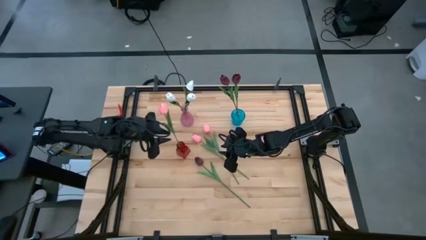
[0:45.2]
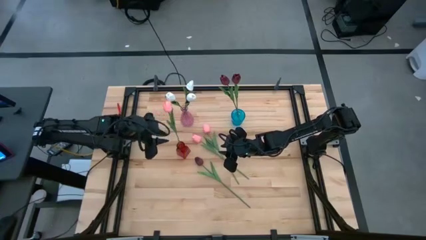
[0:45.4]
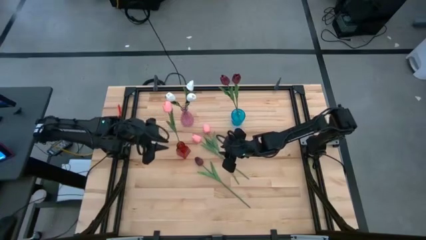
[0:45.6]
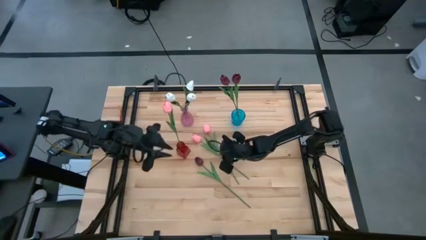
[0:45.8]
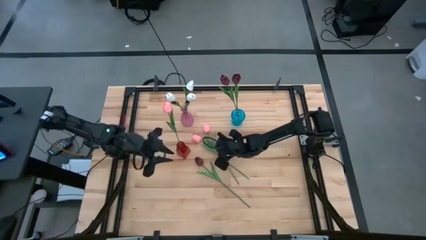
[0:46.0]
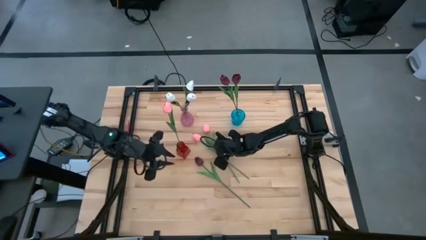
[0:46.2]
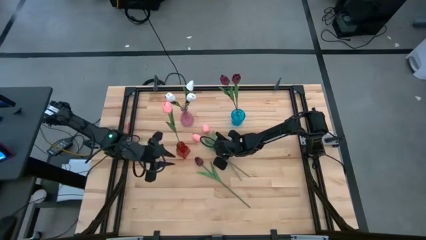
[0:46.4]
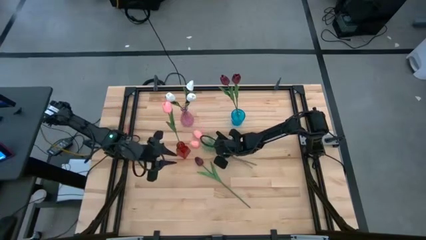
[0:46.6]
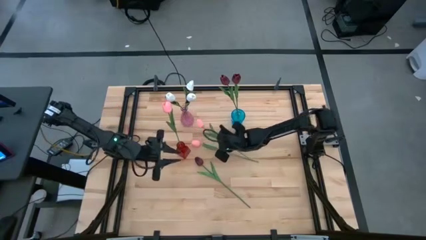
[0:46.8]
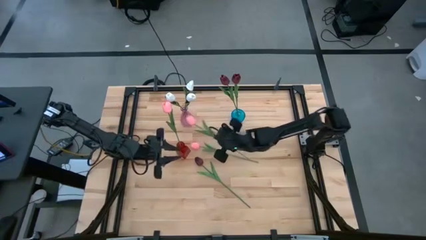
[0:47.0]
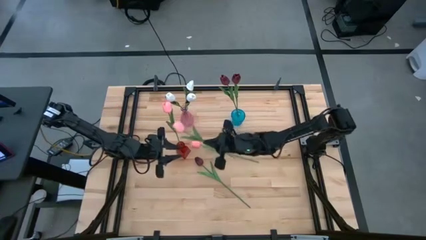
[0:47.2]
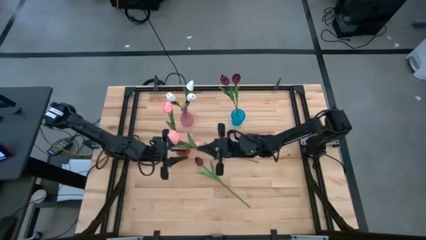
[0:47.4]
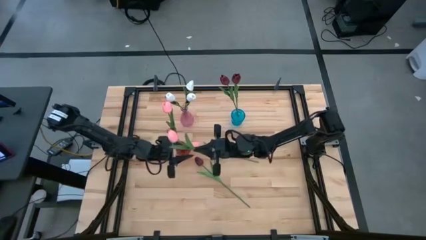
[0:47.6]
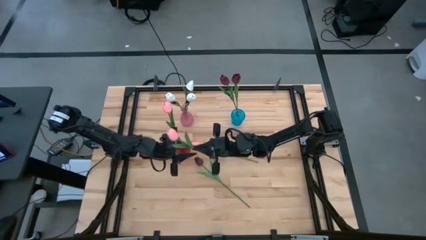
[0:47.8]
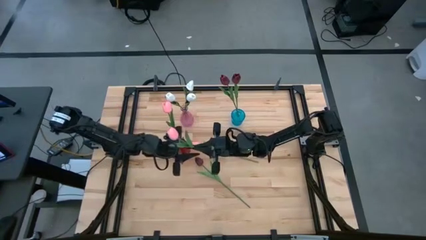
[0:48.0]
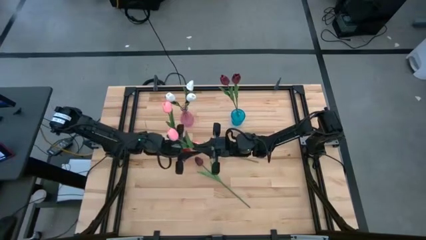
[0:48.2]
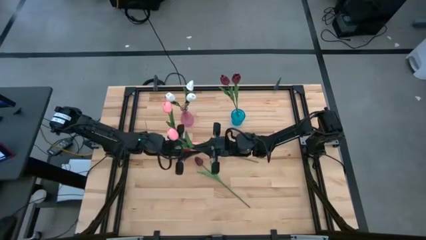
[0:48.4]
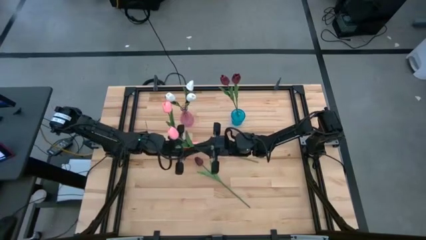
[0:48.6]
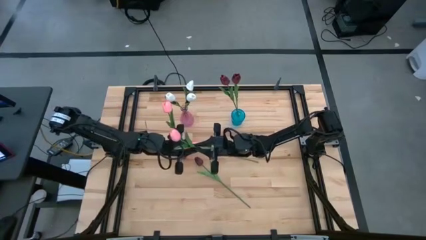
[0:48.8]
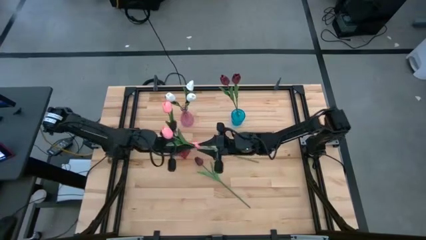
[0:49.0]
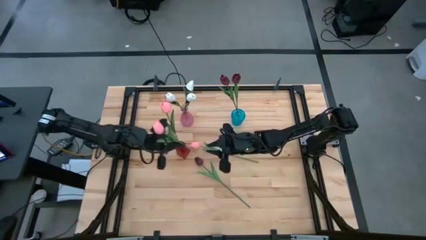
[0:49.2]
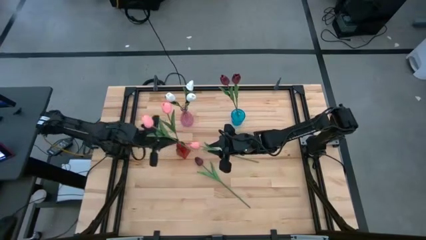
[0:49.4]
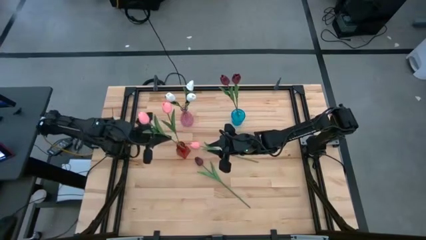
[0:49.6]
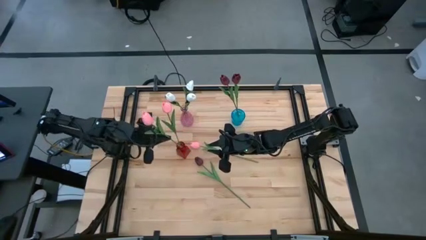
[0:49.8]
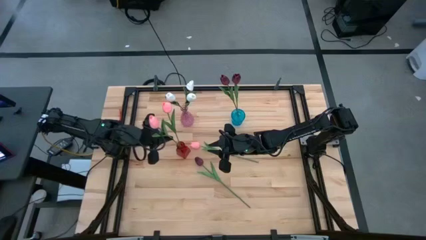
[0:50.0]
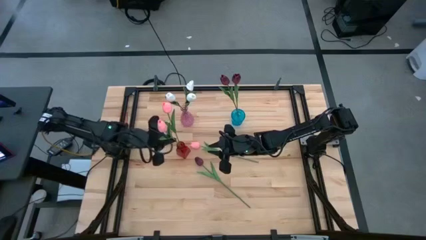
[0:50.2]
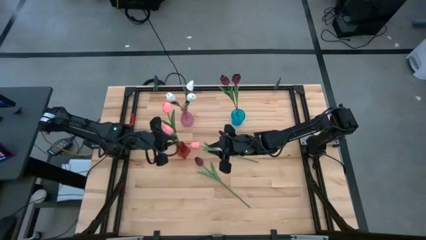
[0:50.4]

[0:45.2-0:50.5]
Task: Sort flowers into vase by color
Put the top pink flower into the red vase

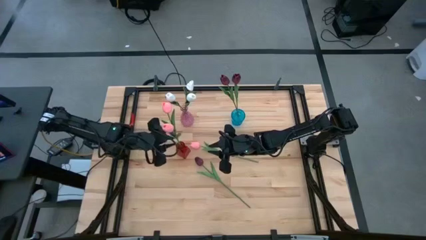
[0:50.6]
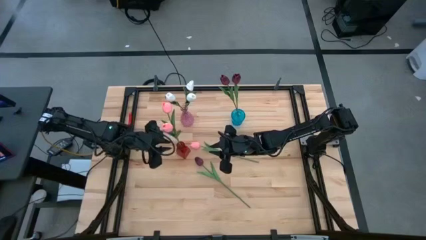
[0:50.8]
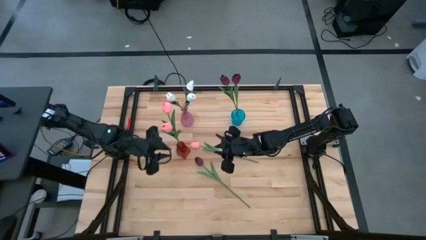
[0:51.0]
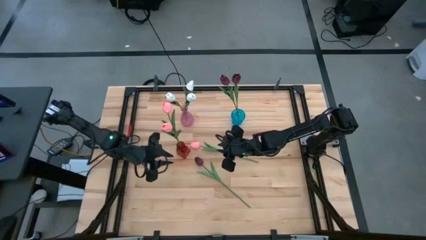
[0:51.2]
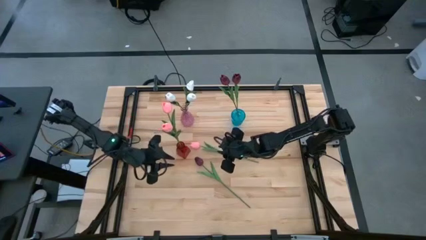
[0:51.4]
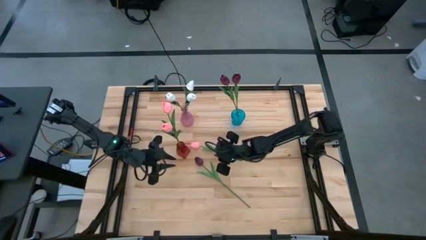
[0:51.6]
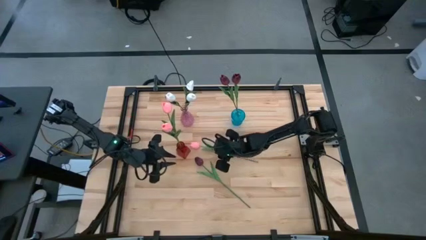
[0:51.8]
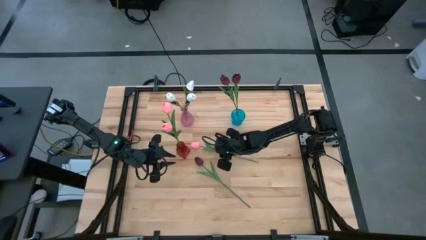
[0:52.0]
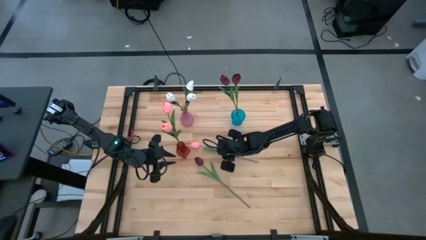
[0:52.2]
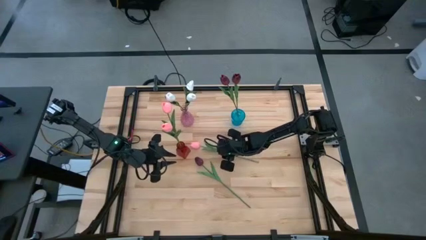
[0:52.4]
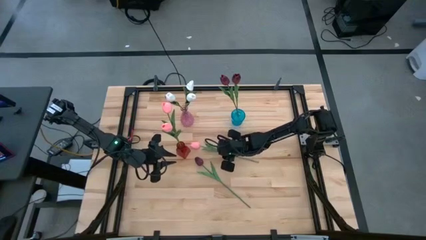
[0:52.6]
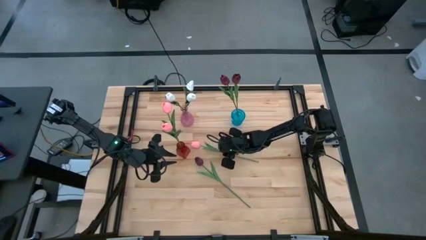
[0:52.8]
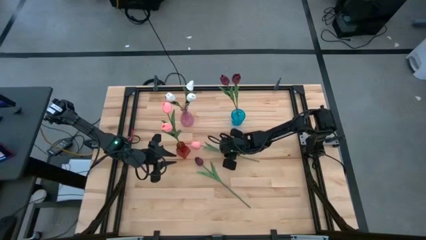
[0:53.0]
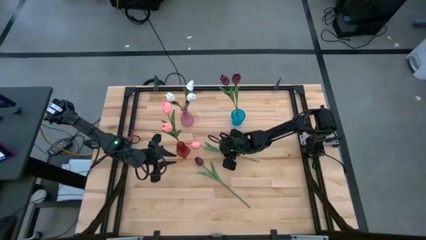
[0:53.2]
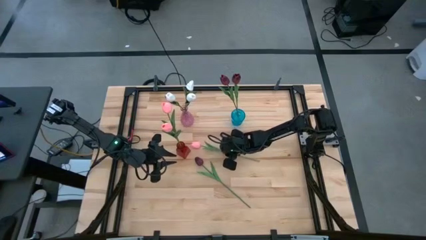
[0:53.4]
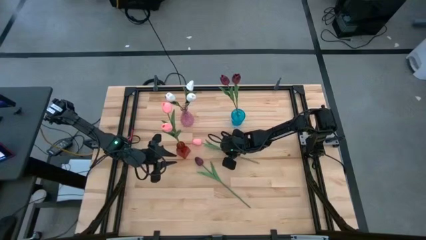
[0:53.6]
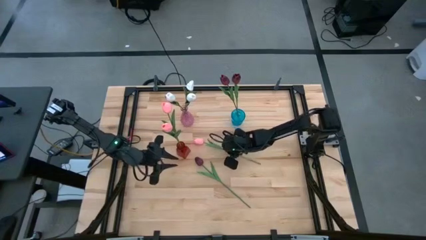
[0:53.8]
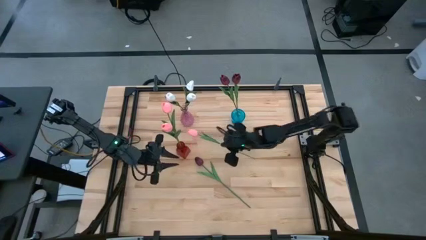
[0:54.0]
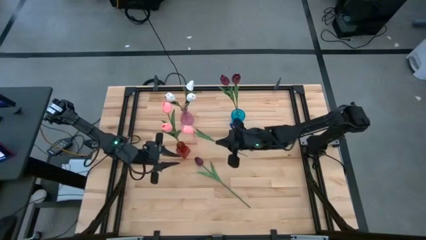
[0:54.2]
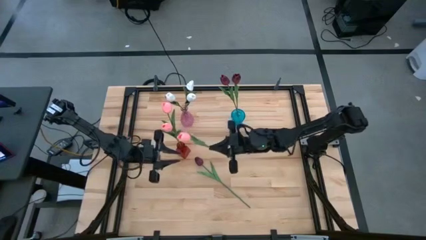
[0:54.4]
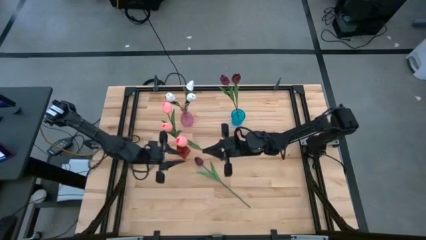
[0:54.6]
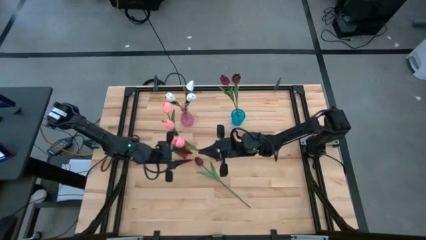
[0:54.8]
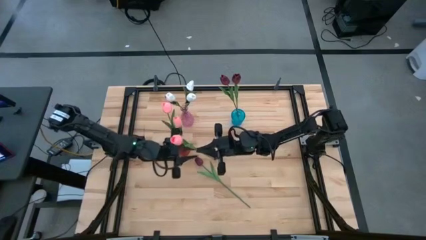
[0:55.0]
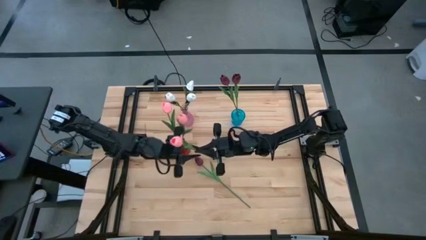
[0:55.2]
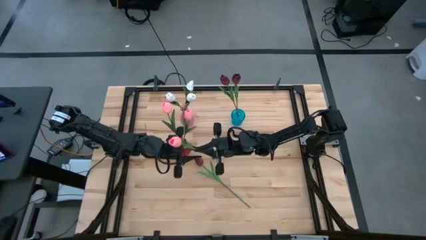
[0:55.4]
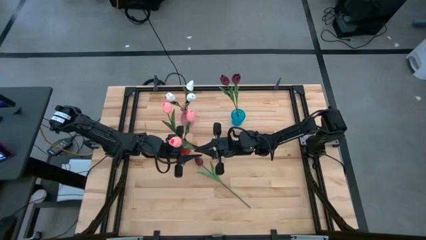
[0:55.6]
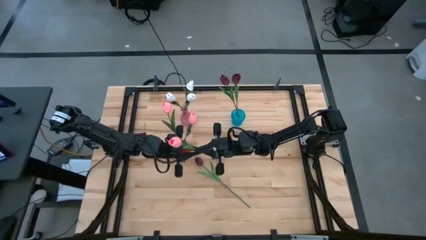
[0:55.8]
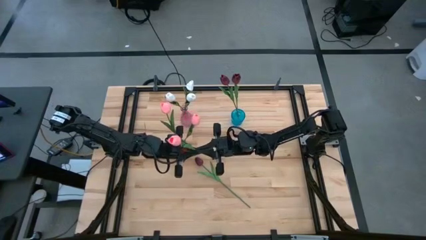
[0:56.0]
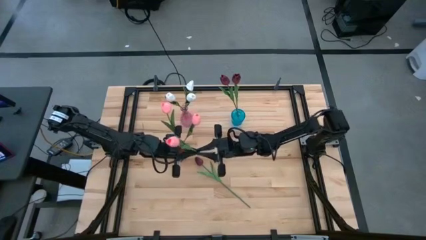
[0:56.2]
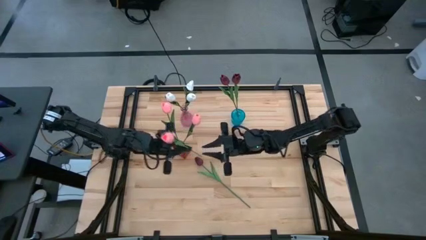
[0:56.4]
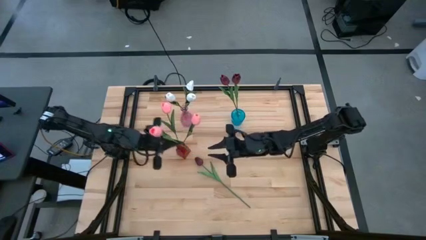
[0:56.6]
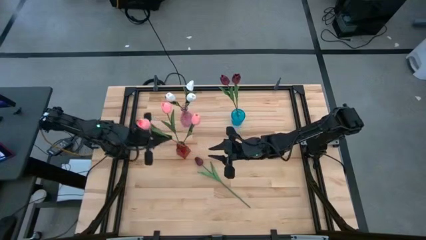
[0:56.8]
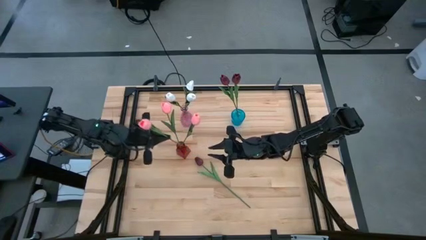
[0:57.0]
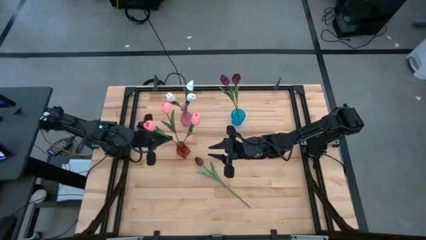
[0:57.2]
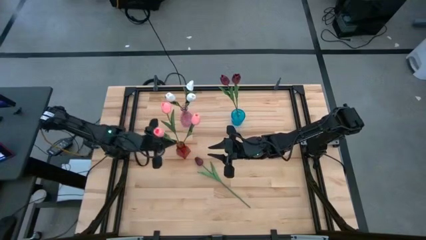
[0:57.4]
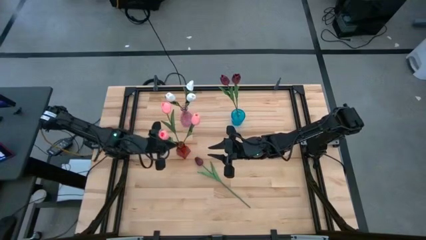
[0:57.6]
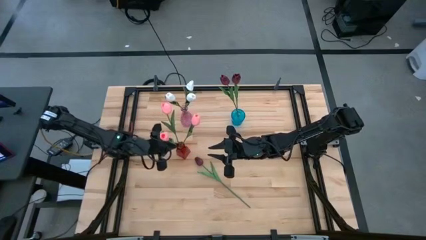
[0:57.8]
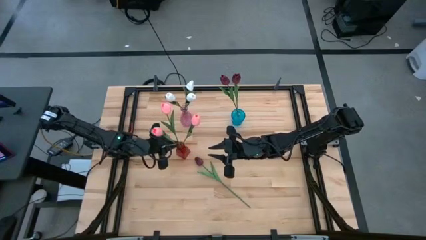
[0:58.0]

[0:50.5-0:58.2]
Put the pink flower into the red vase

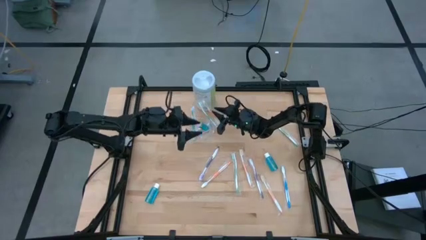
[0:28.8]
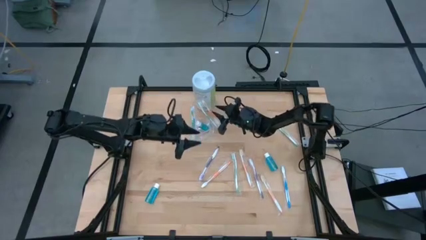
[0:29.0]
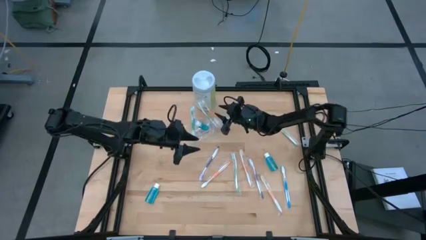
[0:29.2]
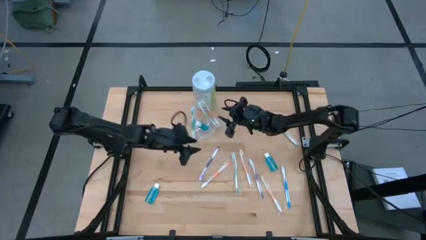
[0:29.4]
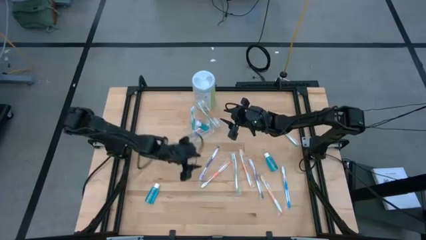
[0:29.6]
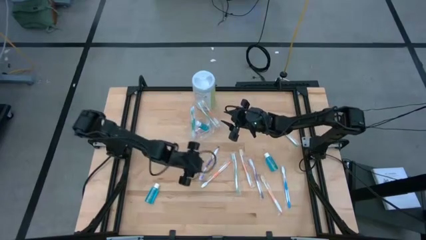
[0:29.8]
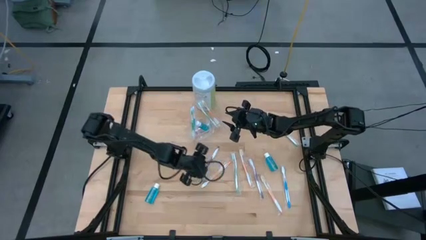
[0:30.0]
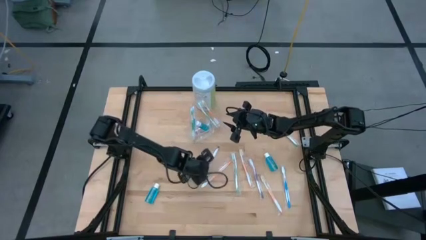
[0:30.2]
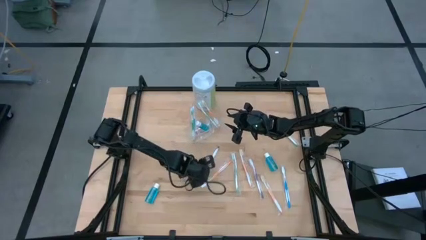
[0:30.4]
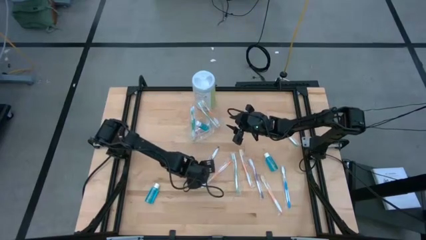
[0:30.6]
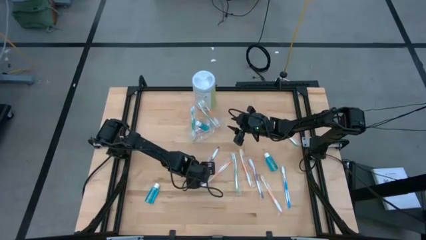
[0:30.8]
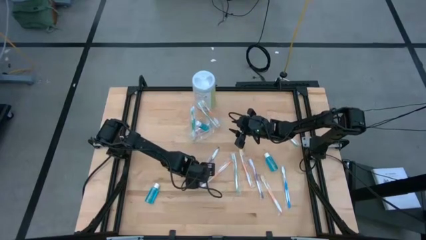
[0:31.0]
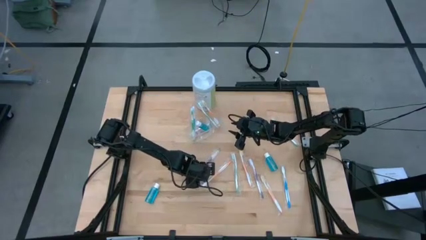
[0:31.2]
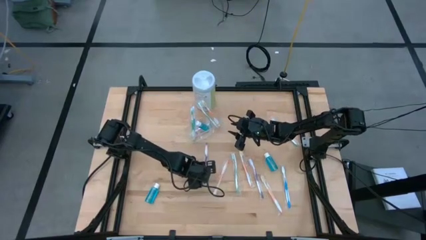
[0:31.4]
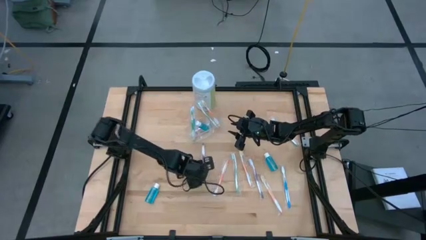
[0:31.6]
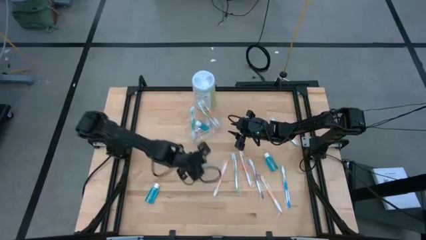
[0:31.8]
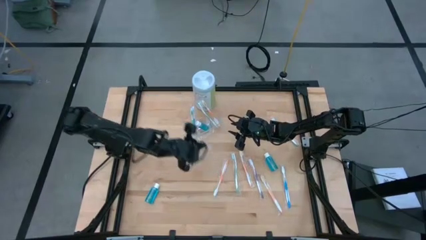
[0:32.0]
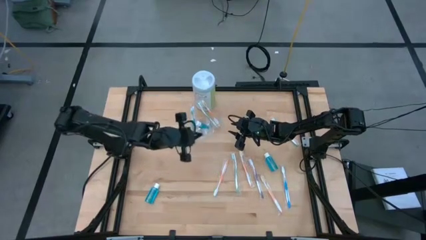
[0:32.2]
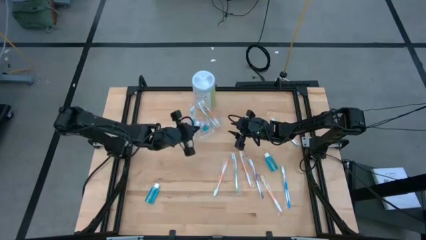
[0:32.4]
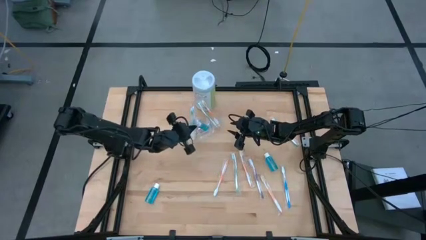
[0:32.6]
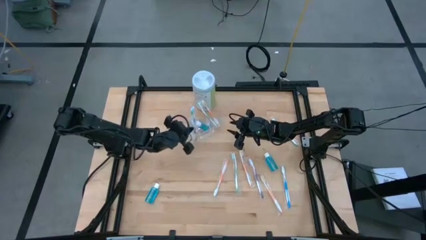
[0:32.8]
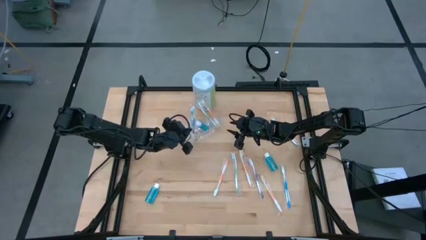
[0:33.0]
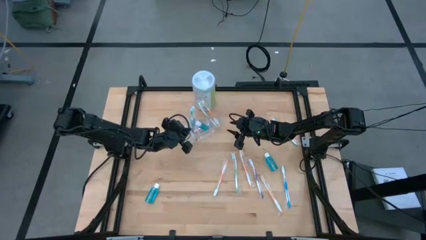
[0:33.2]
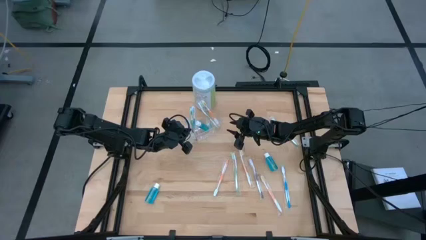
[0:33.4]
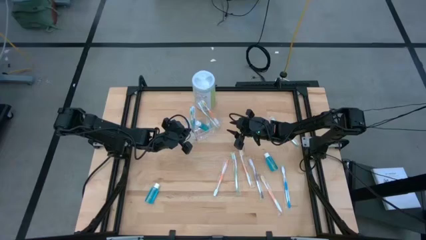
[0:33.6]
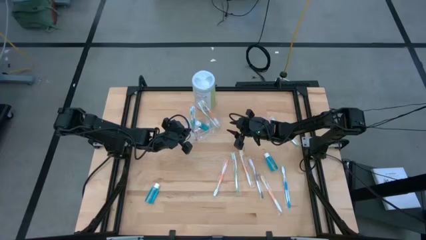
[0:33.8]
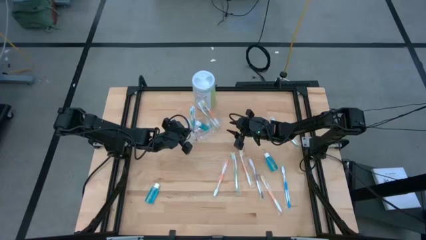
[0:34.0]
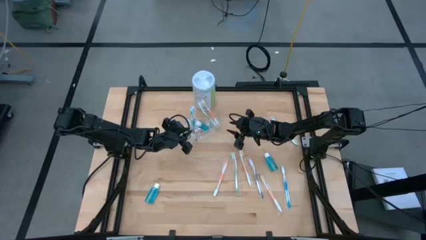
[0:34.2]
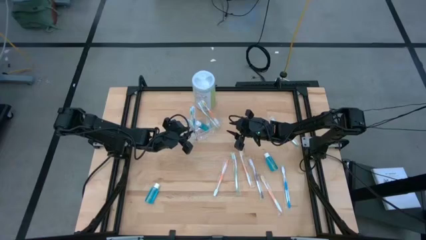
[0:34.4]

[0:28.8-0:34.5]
Task: Pick & Place toothbrushing station
Put the violet toothbrush into the transparent organizer
